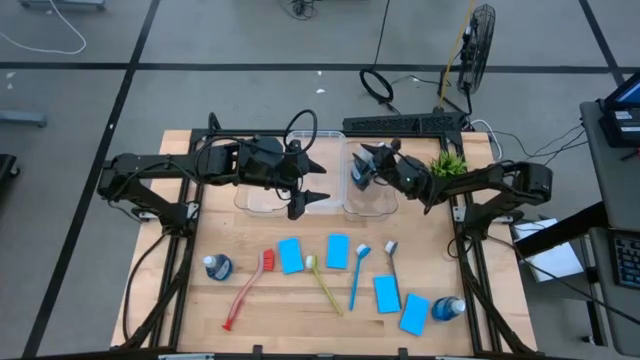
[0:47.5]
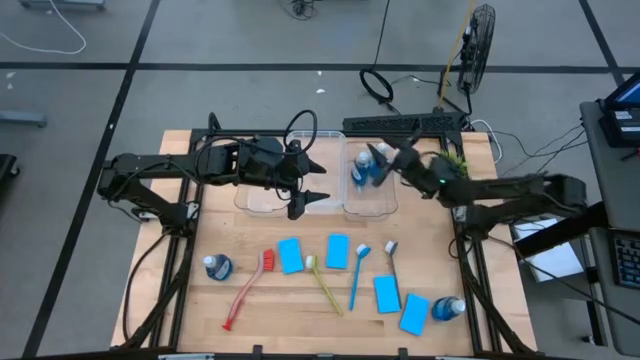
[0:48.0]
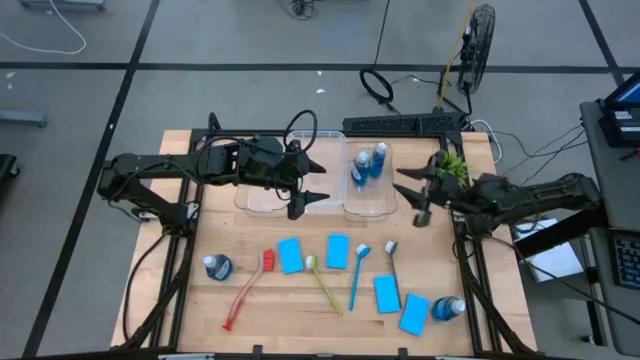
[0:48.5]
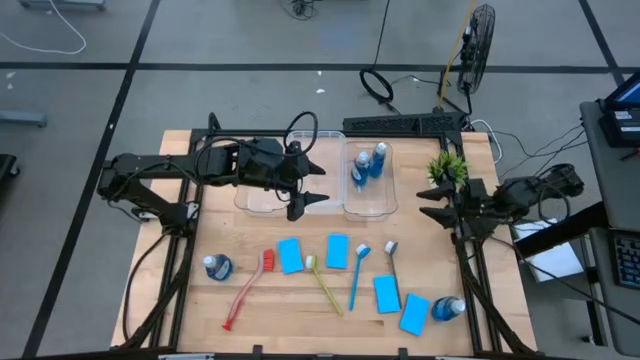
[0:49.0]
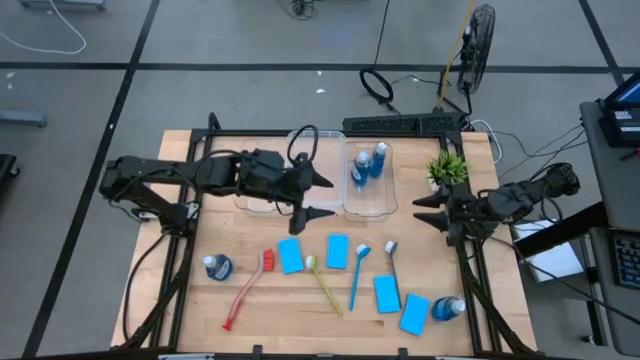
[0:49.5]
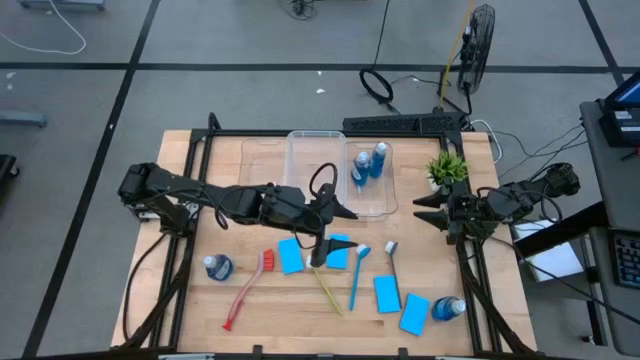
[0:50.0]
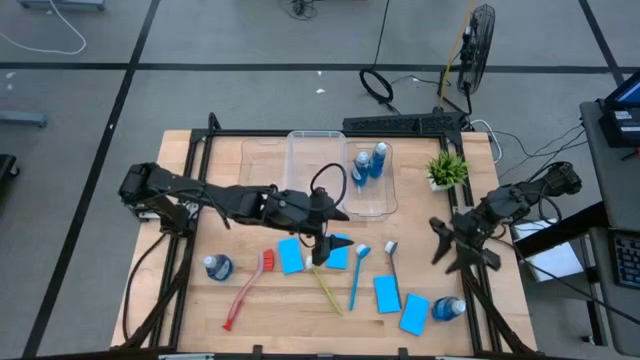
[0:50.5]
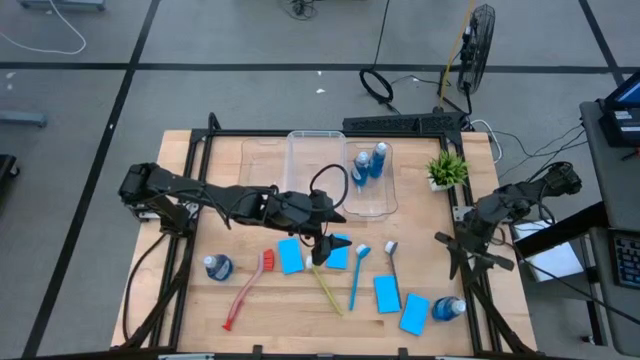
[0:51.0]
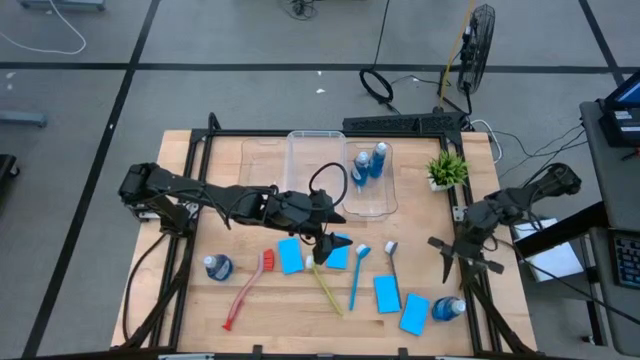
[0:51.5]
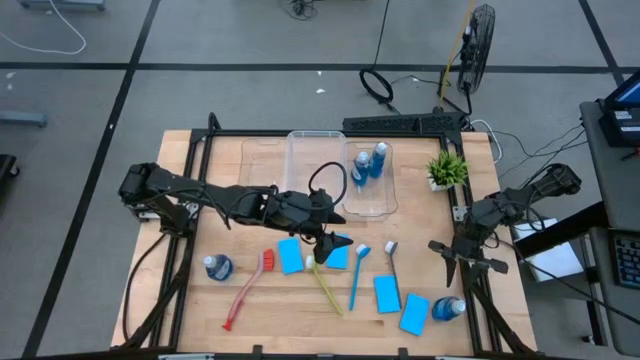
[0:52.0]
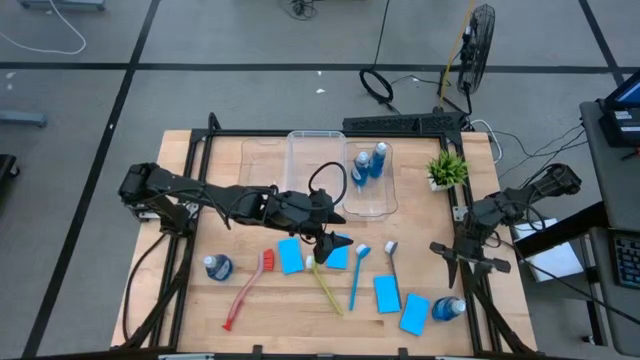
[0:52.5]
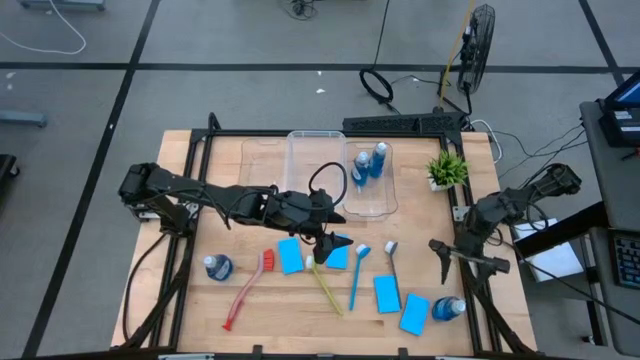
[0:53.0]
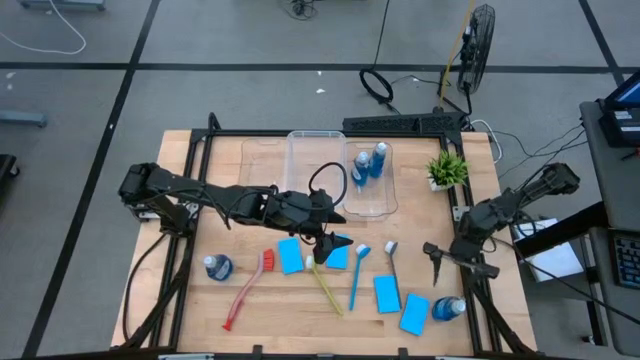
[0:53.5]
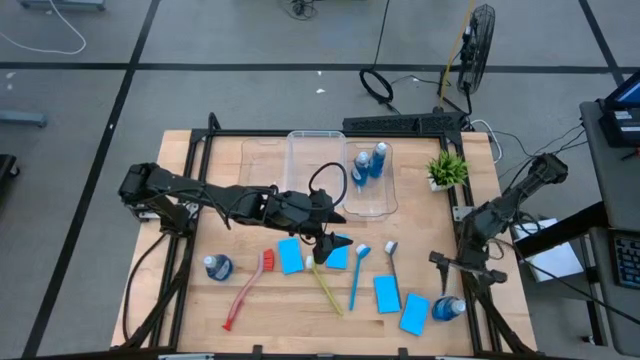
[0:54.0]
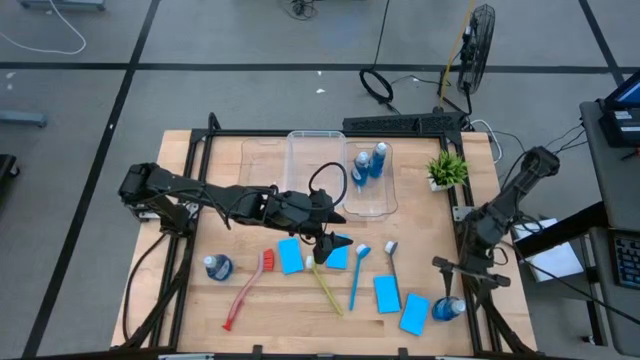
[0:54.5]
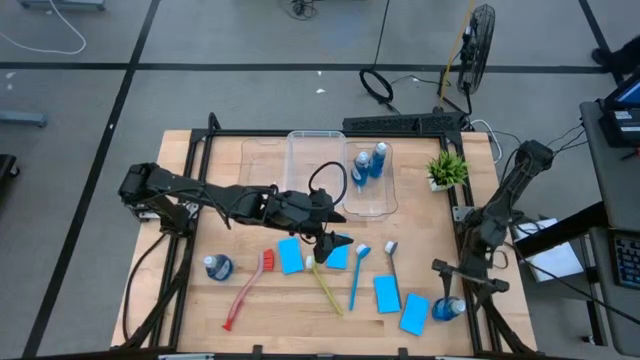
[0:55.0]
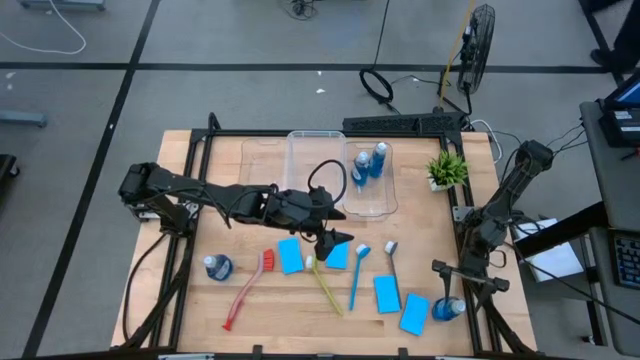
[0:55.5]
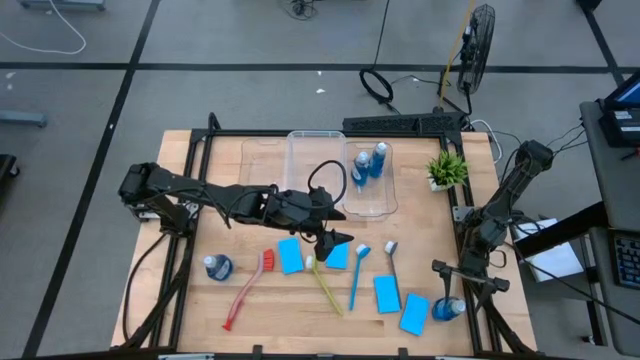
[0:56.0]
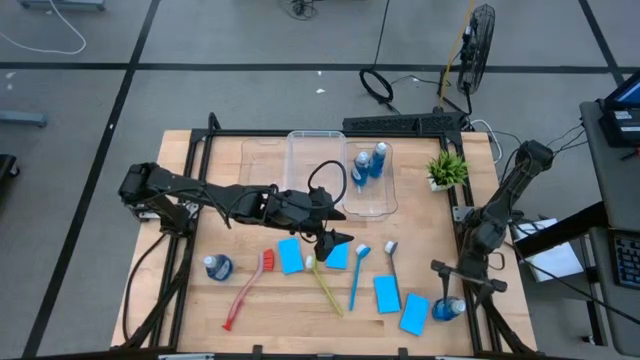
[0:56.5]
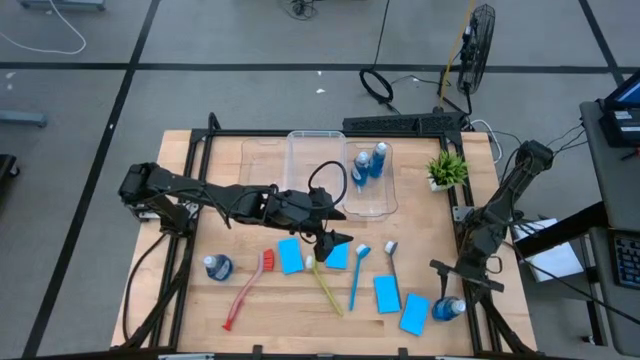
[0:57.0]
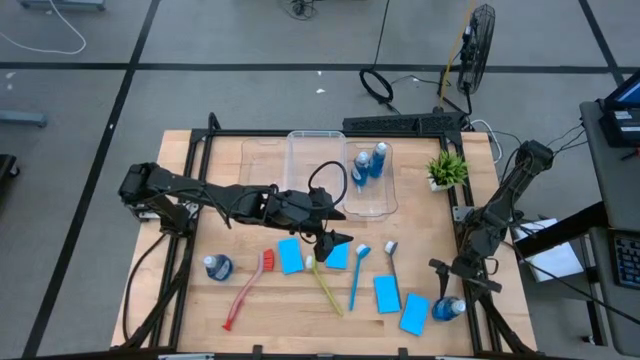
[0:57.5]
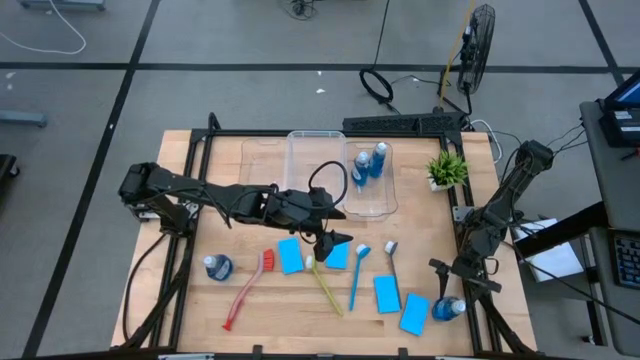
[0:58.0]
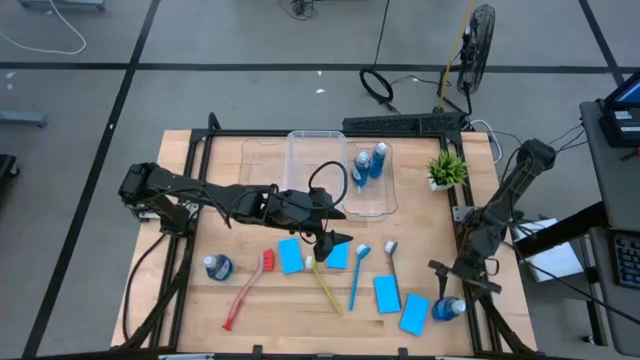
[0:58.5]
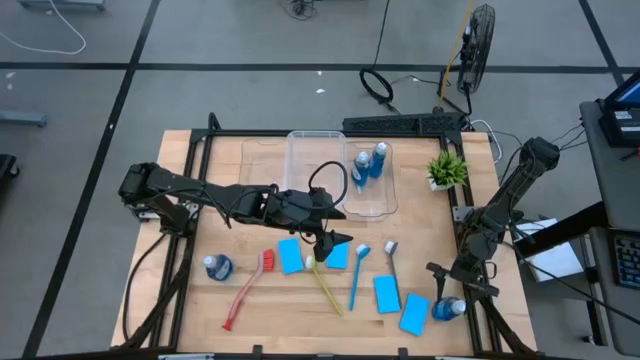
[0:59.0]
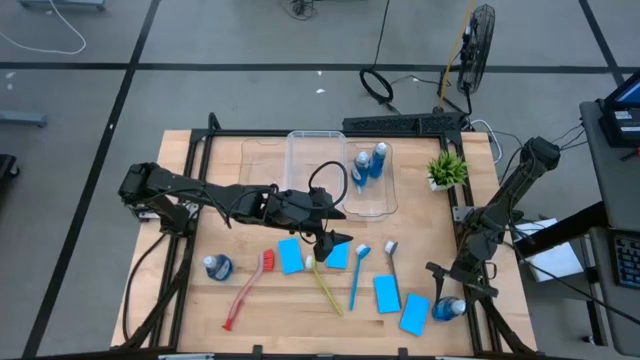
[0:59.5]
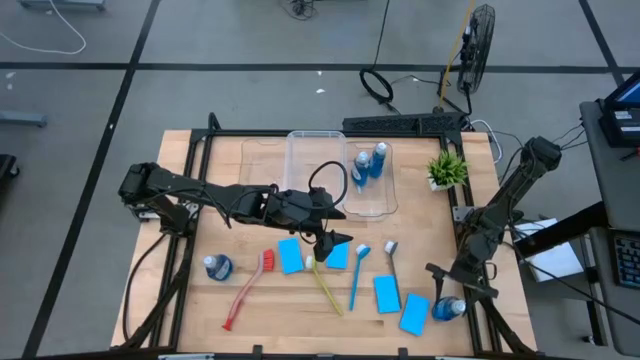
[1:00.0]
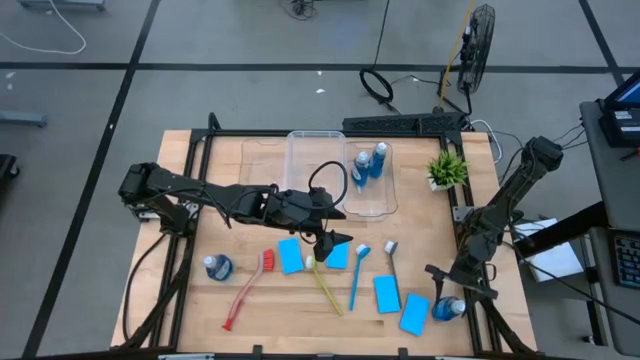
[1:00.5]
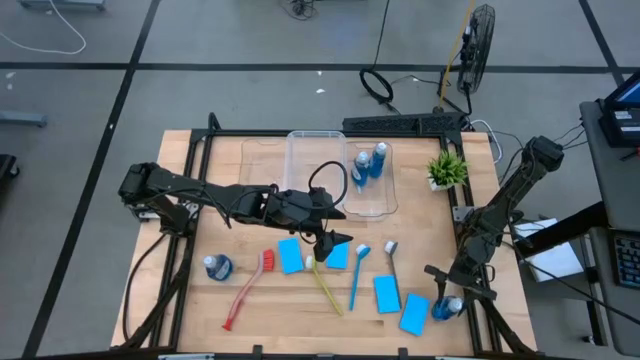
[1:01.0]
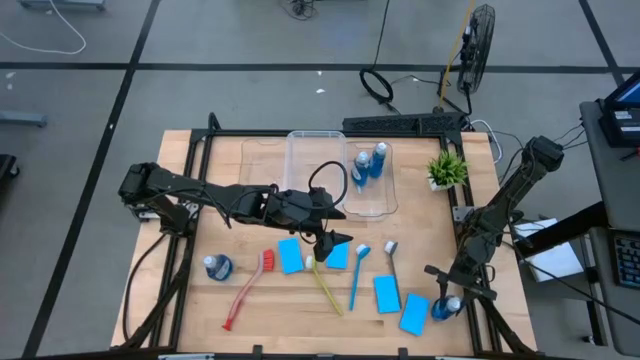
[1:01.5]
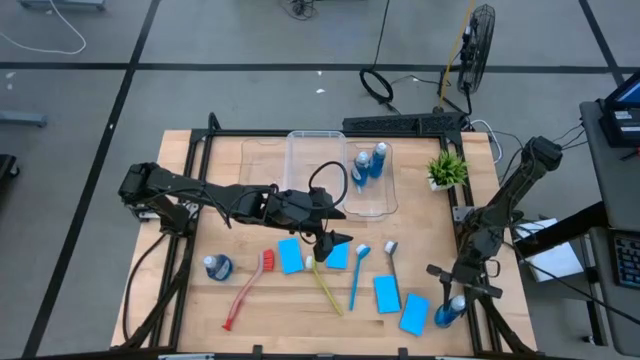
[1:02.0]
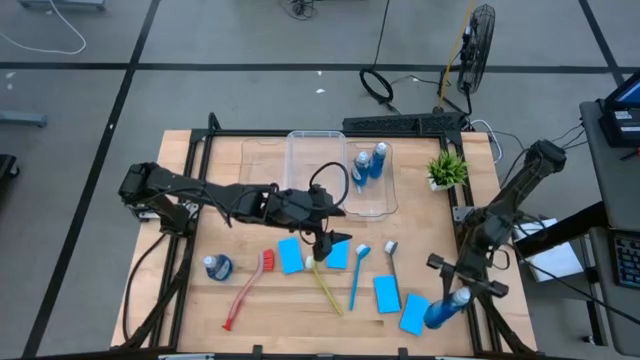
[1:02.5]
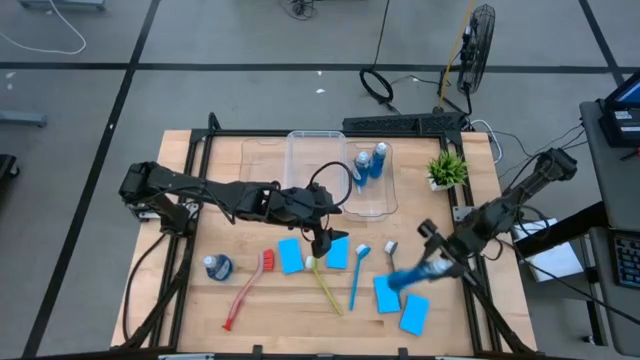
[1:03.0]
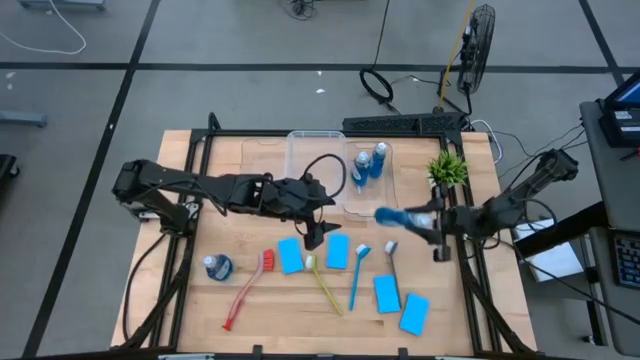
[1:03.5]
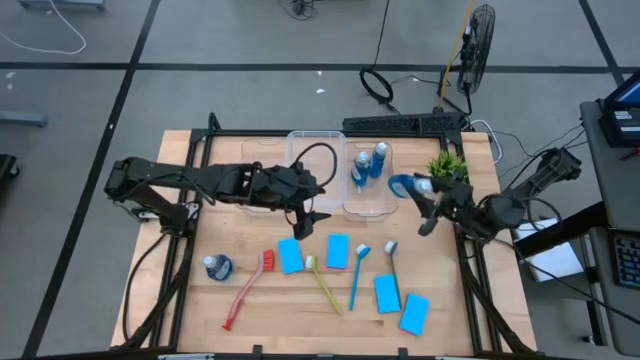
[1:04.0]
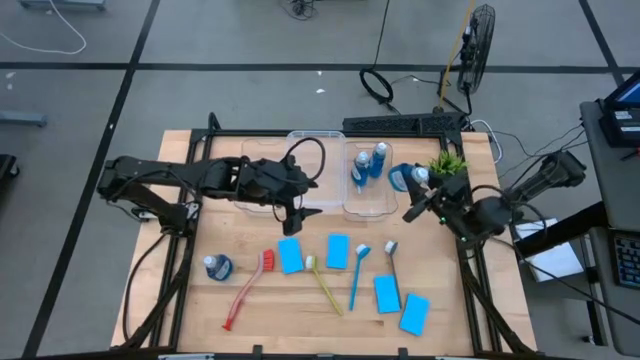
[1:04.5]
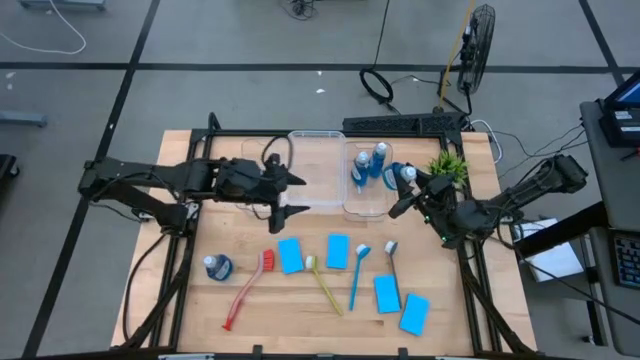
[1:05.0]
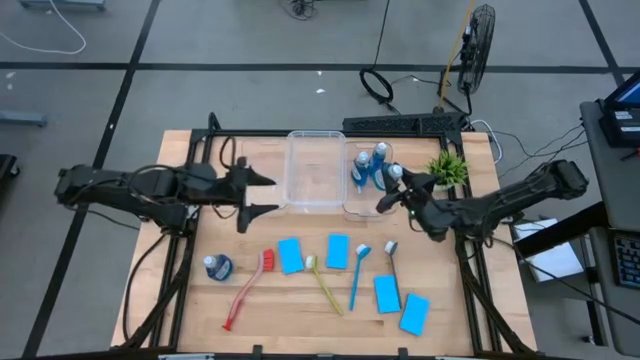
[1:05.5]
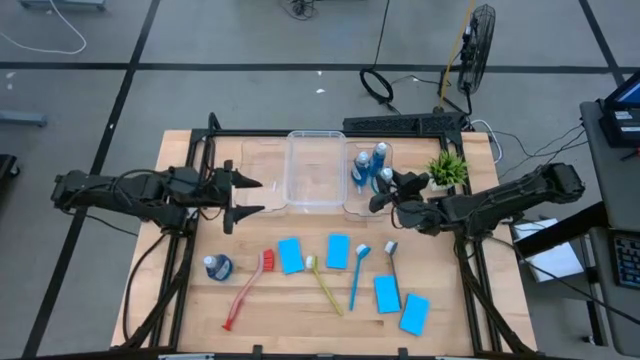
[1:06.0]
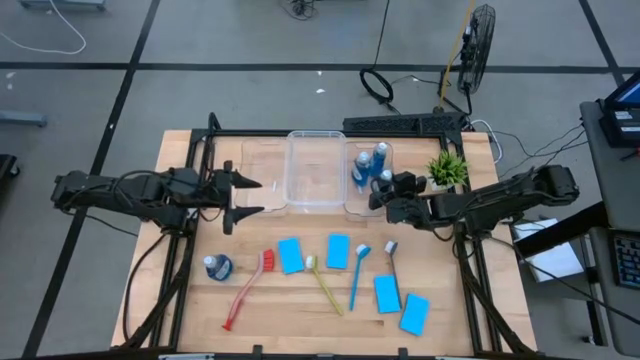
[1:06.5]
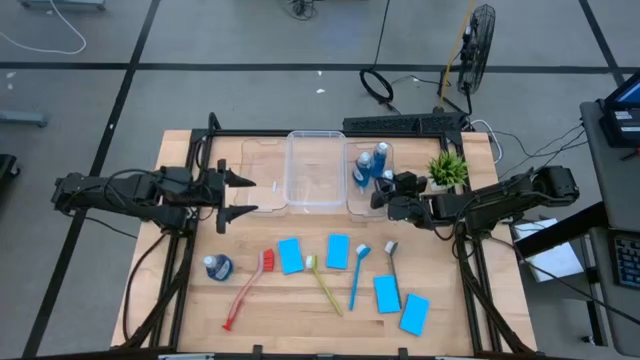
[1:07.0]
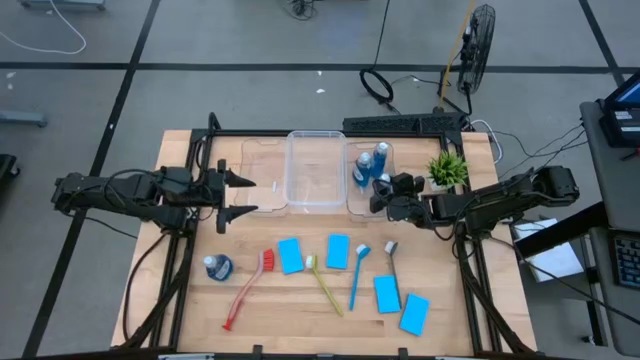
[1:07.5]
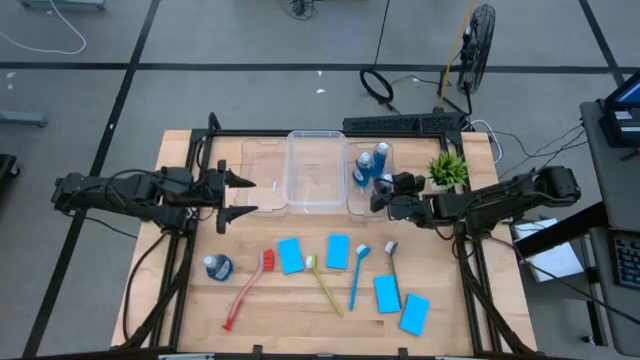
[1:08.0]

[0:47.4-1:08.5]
Task: Pick & Place Kitchen Sink Supplies
Put the blue dishwashing liquid into the right transparent bin
